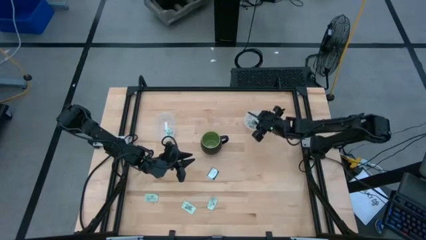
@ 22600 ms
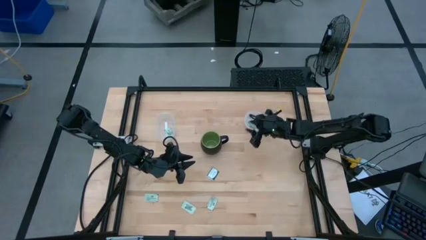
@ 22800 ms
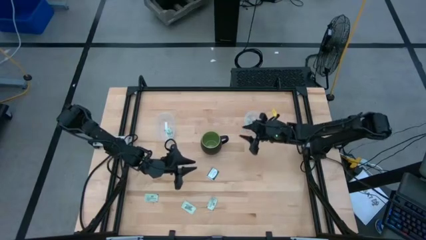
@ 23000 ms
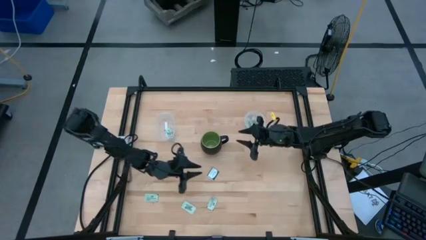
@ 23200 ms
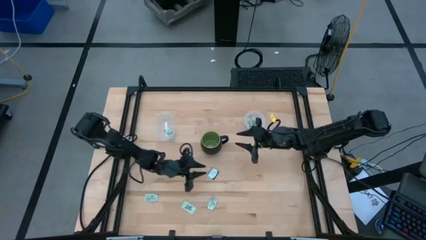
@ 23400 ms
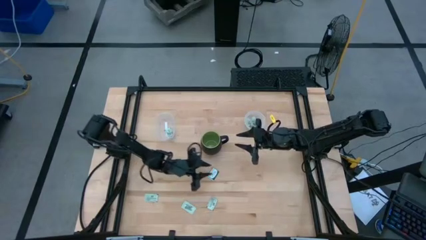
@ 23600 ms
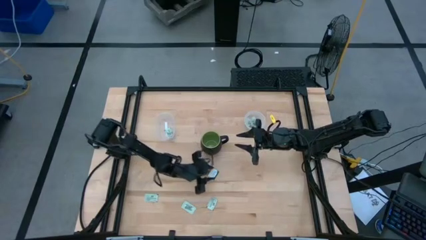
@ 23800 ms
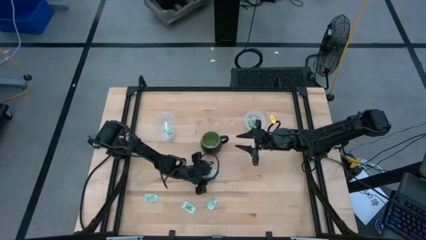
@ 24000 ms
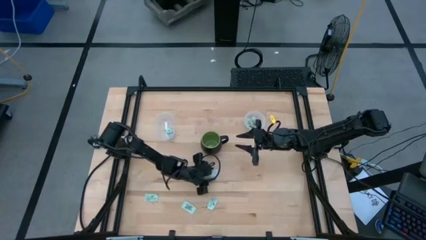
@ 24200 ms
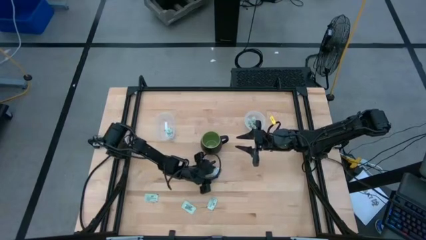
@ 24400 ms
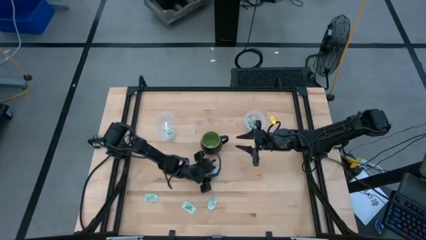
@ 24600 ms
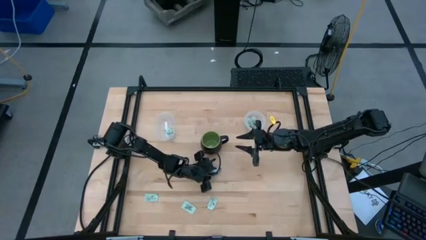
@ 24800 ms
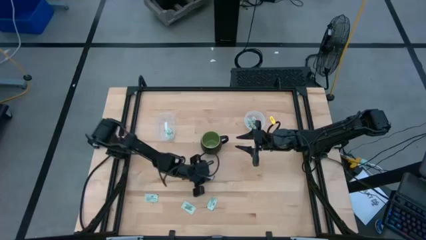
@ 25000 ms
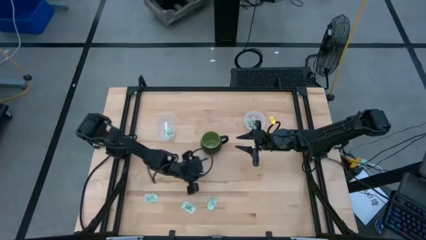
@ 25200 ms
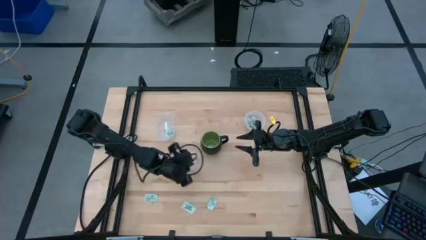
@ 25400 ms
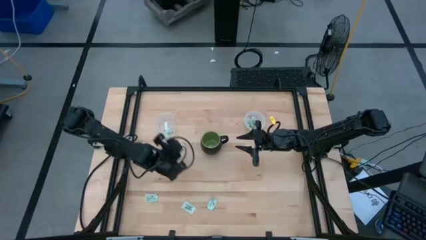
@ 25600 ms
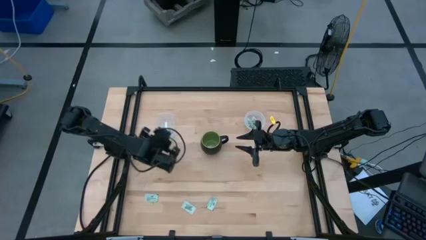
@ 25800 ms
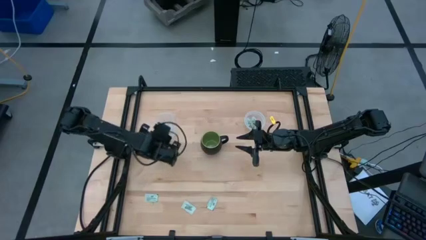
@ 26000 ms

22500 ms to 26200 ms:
Task: Pick and place items into bin
Put the green truvia packet into the left transparent bin

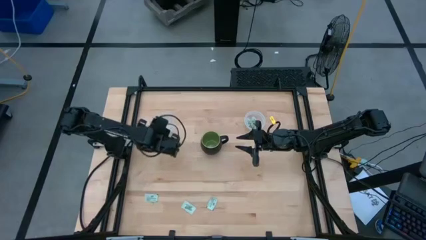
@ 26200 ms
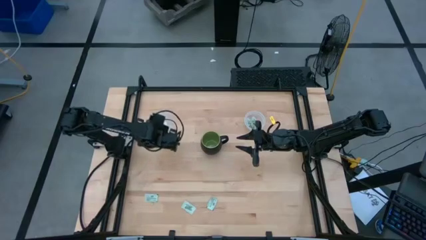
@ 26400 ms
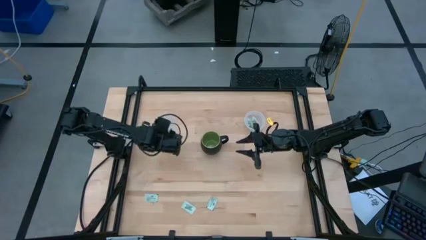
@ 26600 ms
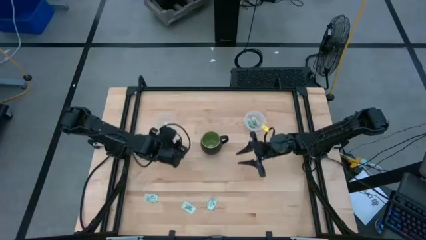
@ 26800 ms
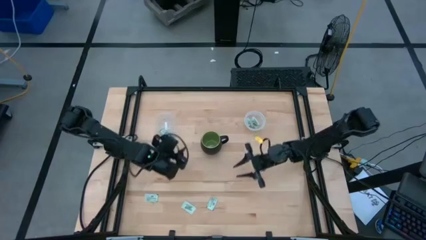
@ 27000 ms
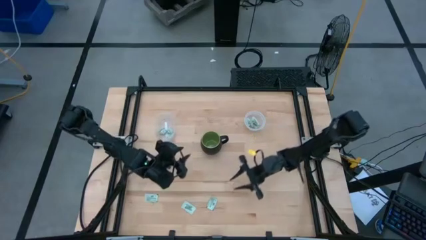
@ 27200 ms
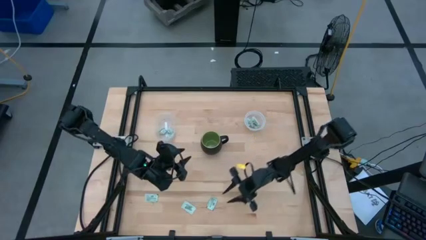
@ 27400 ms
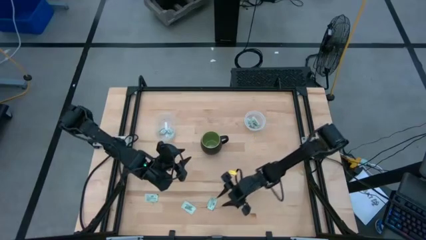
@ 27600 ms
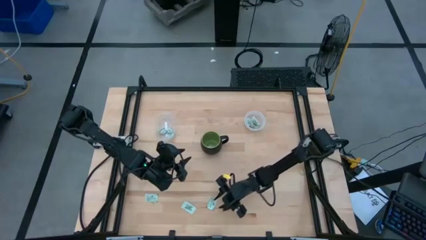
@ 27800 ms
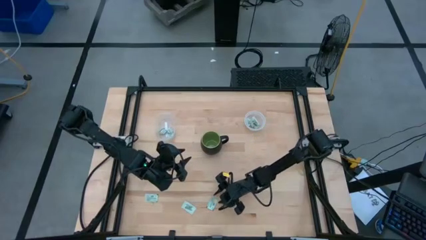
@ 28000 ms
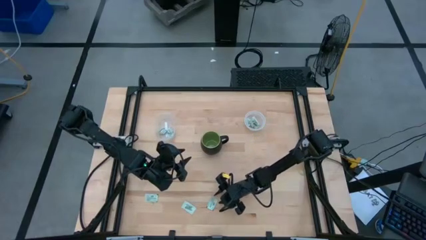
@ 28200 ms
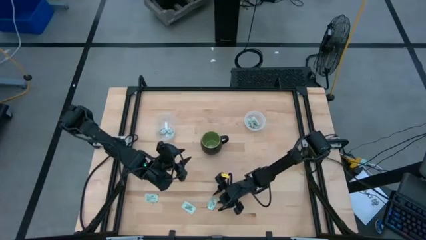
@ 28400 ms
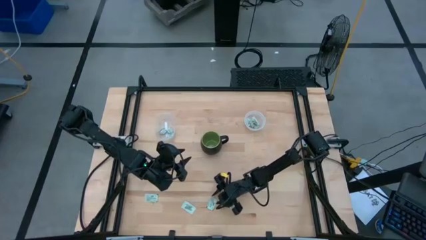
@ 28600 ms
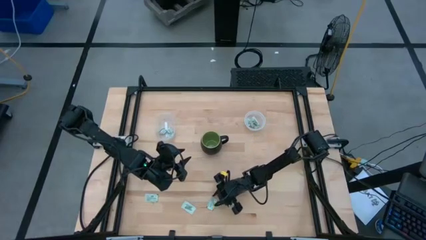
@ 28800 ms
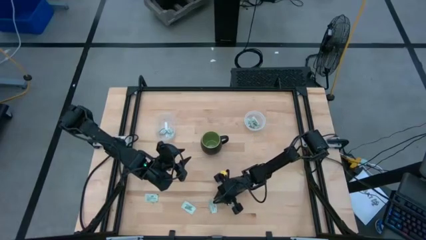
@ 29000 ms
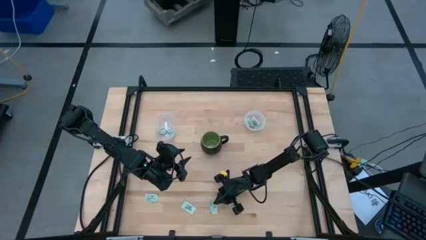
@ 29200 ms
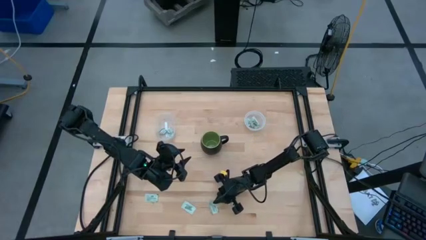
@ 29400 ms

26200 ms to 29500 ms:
Put the green stevia packet into the right transparent bin

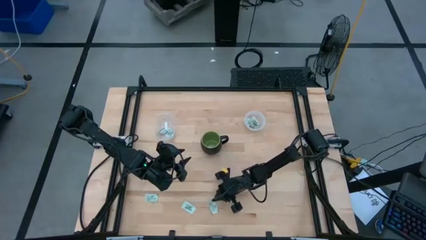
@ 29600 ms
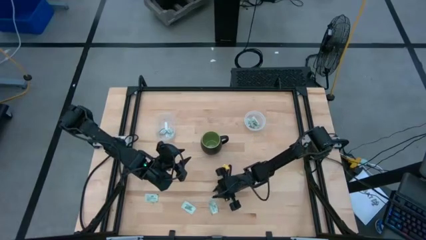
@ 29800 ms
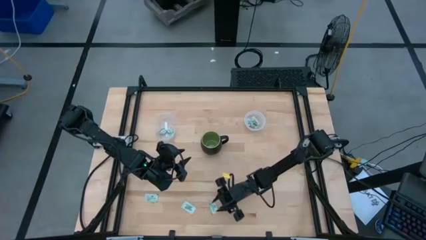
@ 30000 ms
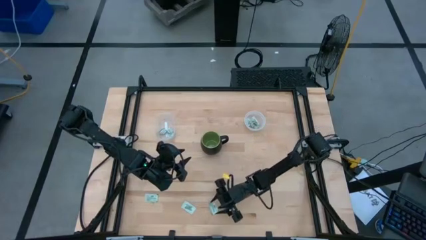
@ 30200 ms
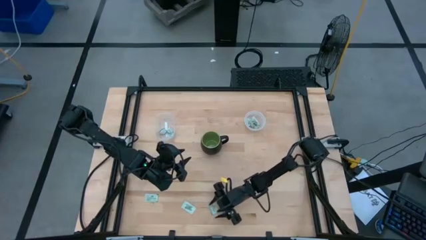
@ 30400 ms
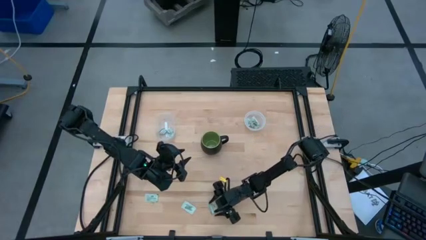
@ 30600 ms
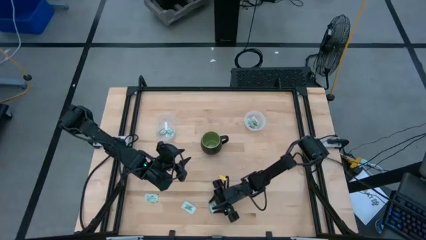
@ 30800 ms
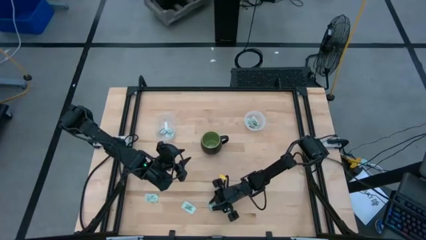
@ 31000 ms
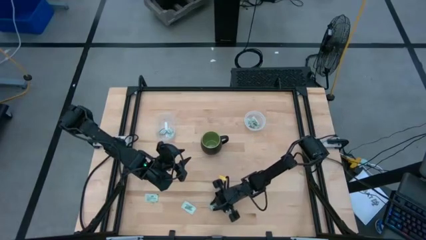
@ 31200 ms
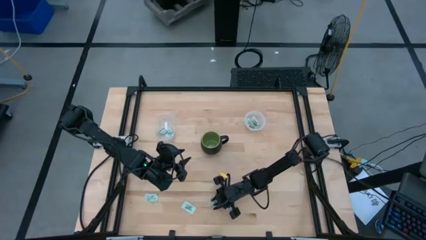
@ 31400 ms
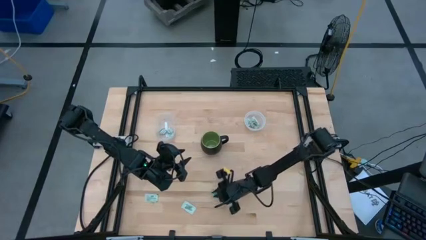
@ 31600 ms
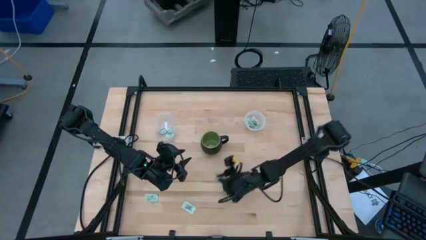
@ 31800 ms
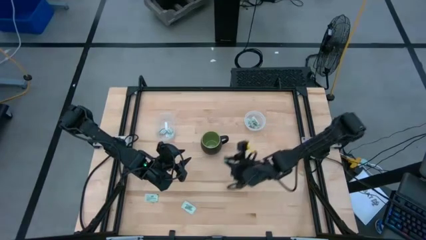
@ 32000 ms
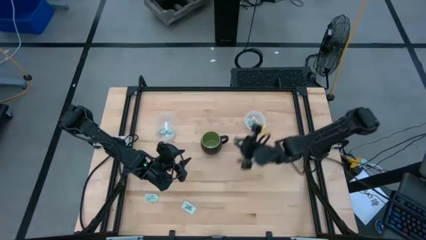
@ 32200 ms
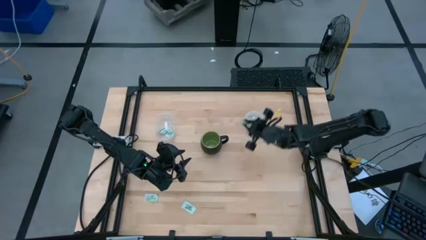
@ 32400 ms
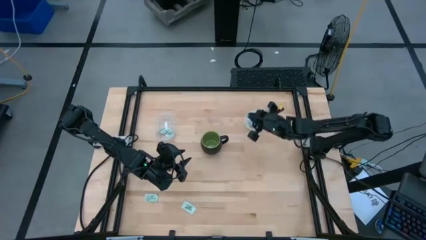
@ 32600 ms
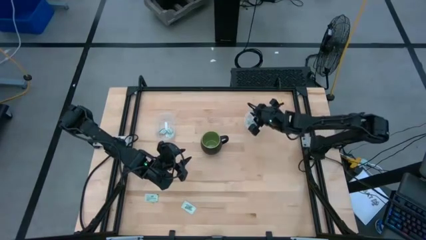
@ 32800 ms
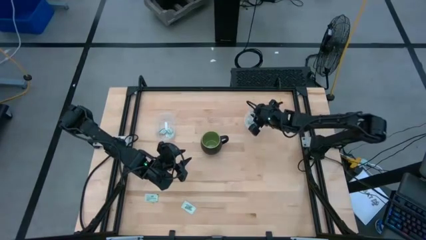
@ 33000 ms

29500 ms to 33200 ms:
Put the green stevia packet into the right transparent bin

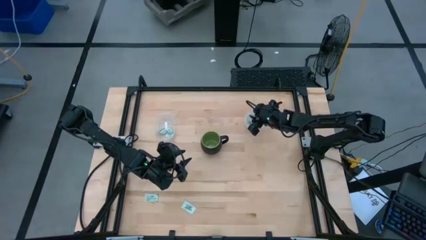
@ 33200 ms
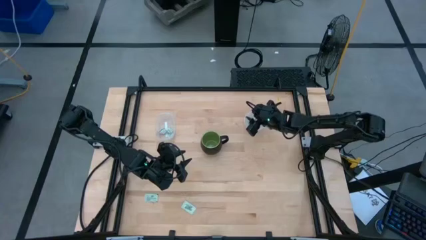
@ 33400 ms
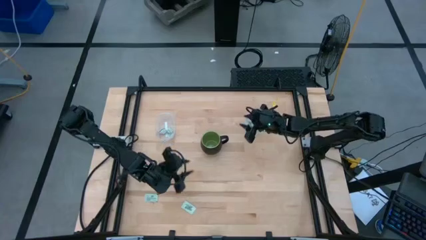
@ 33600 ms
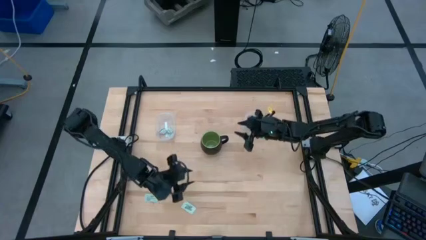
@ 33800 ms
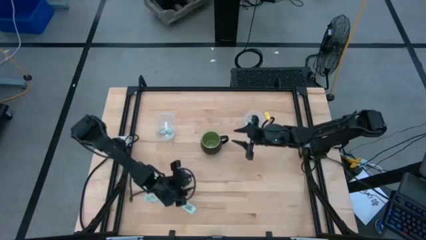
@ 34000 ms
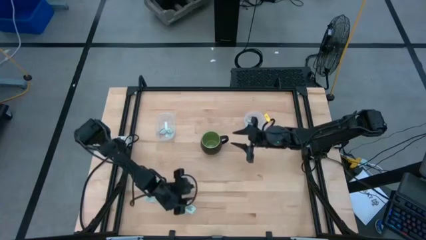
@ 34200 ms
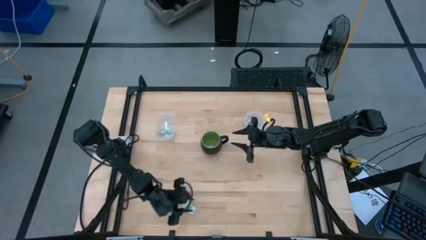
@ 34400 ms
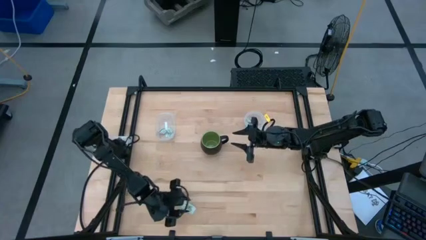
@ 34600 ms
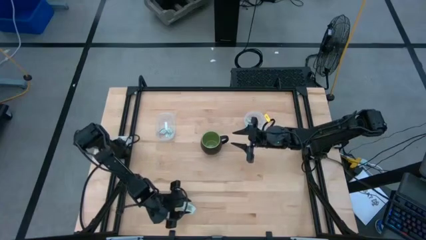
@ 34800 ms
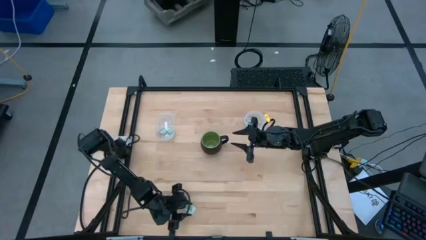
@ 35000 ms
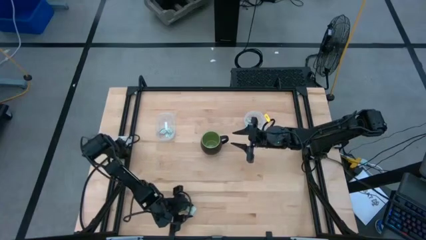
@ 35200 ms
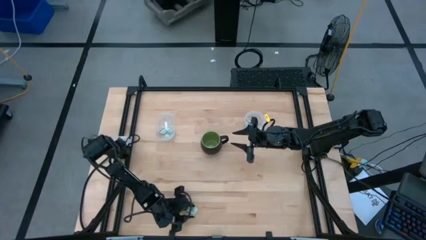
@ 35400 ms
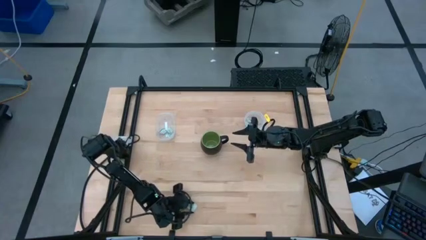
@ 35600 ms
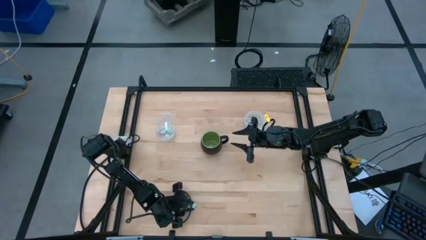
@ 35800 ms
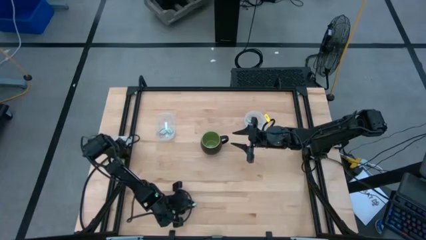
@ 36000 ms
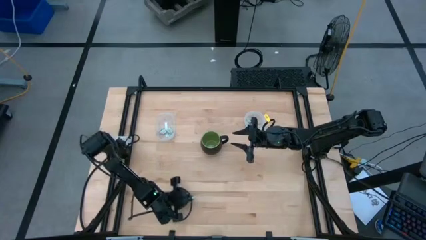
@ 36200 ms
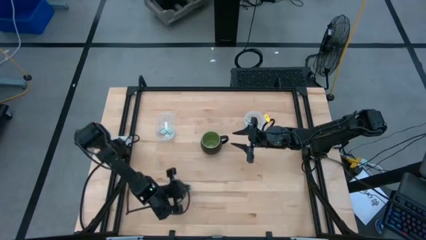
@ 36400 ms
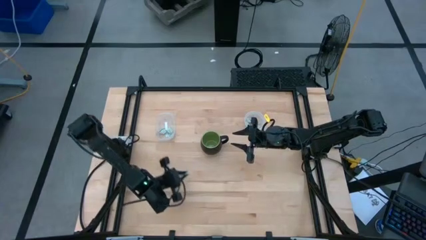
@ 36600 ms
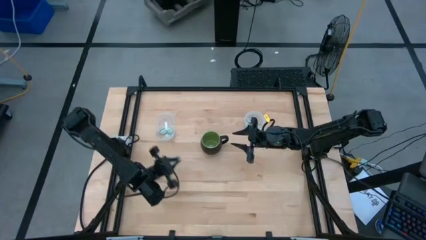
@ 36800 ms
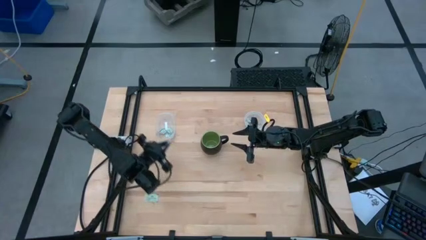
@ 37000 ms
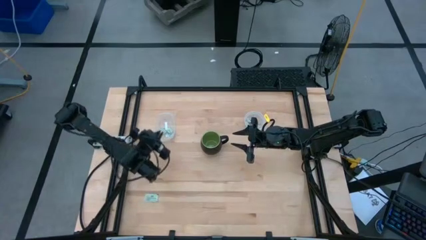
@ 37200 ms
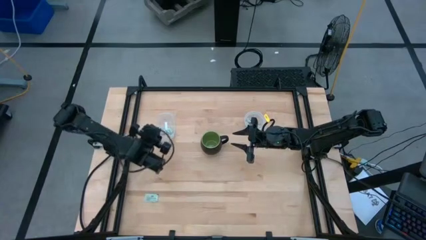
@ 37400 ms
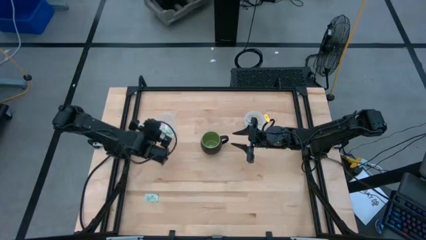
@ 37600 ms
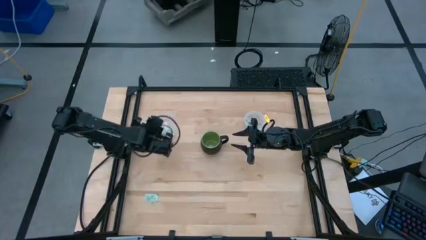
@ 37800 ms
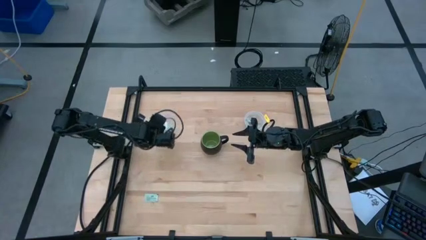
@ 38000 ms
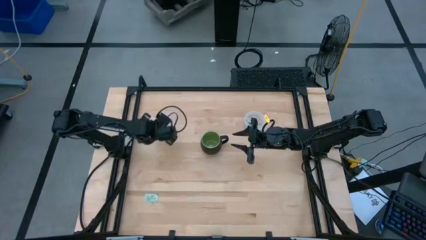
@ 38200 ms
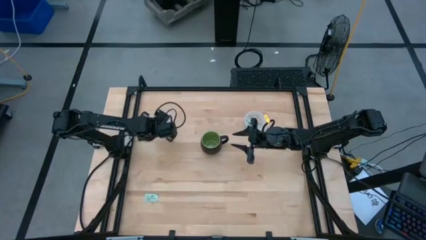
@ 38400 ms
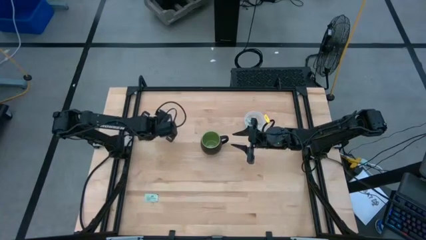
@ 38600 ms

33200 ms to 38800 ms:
Put the green stevia packet into the left transparent bin

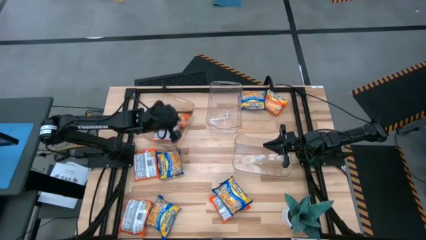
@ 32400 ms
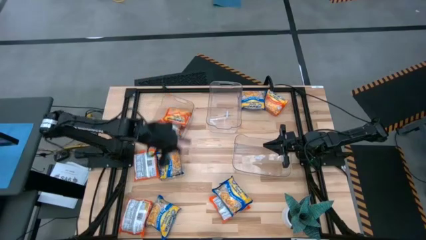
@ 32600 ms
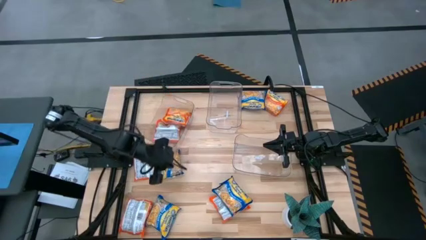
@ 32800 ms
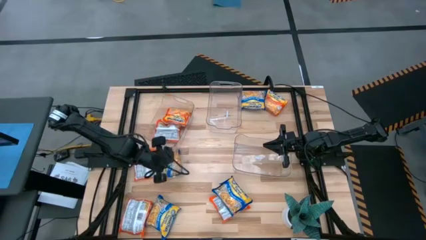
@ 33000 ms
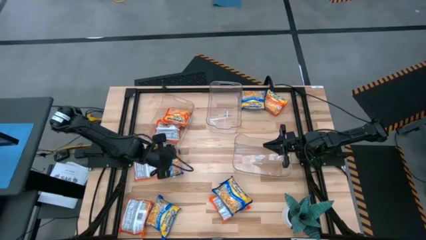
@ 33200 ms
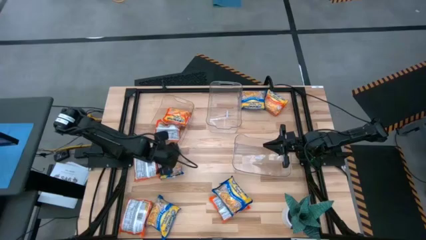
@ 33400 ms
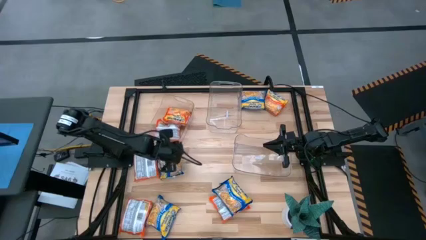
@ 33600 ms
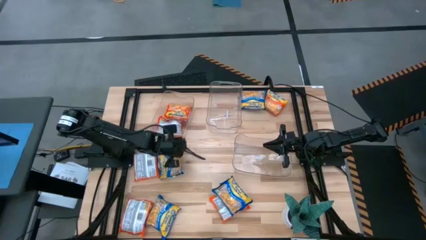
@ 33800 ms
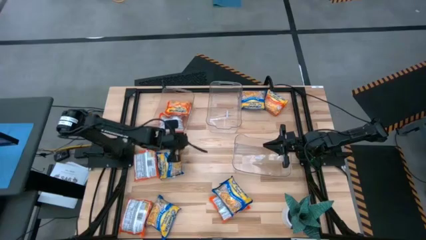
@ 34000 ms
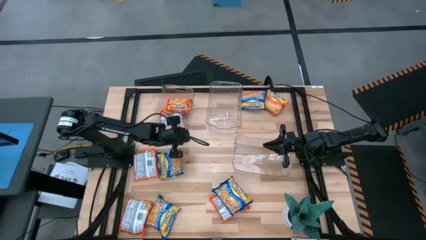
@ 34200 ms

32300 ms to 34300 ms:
Task: Sort Maruchan noodles
Adjust the left transparent bin
